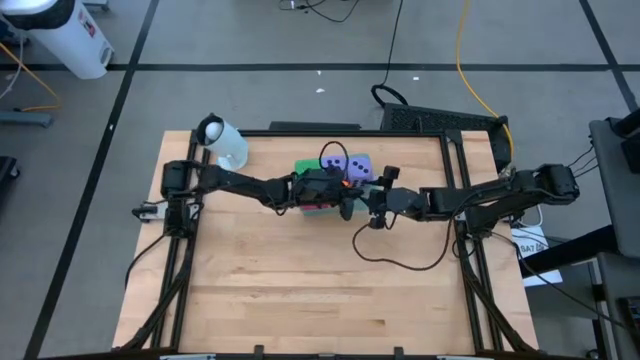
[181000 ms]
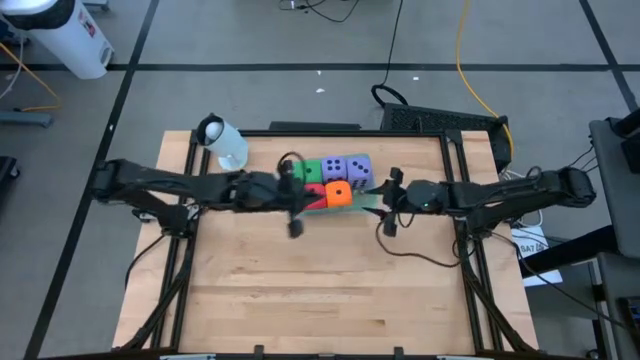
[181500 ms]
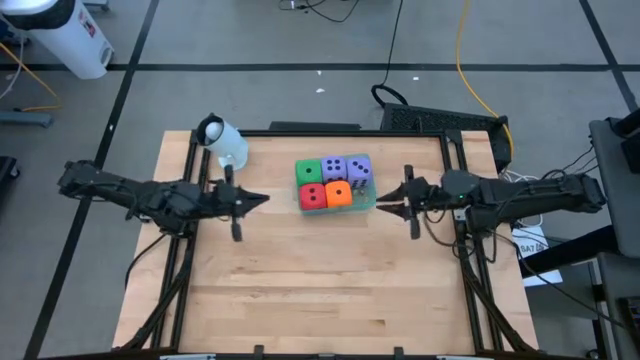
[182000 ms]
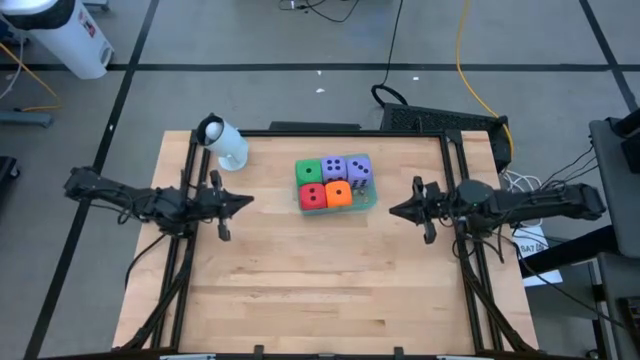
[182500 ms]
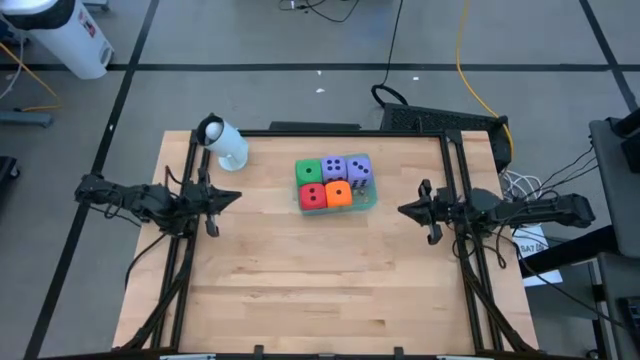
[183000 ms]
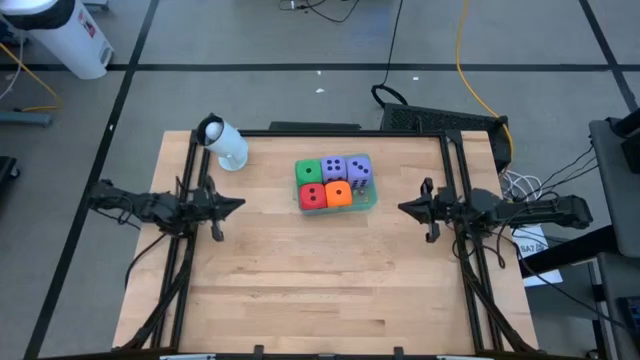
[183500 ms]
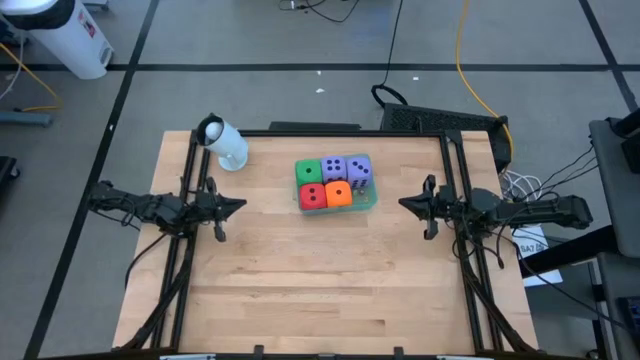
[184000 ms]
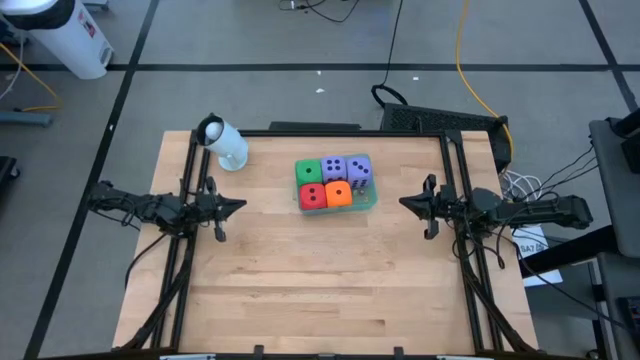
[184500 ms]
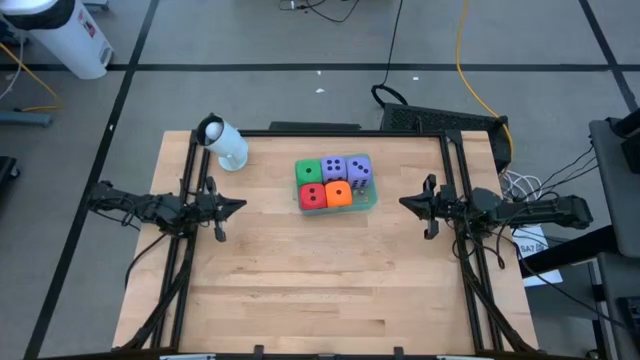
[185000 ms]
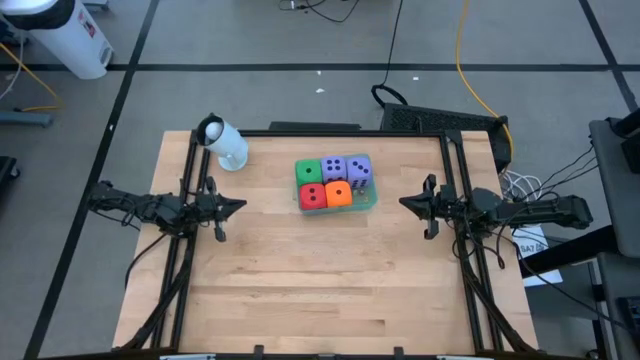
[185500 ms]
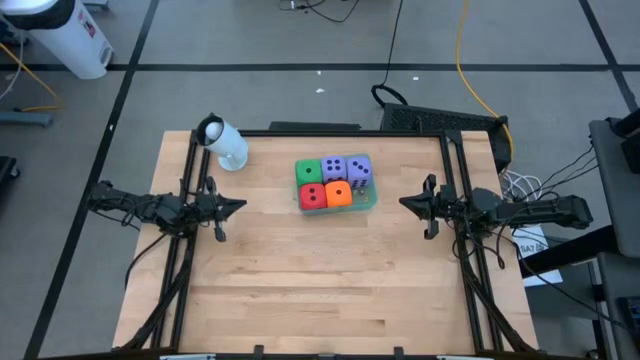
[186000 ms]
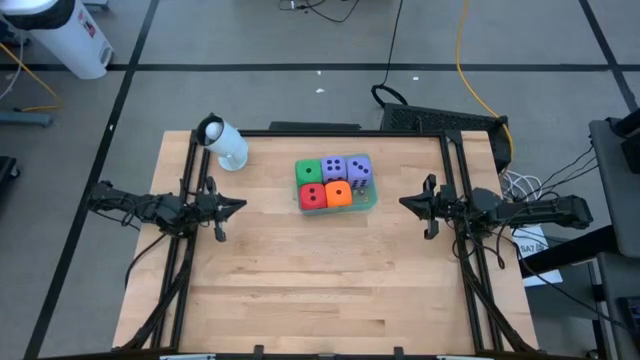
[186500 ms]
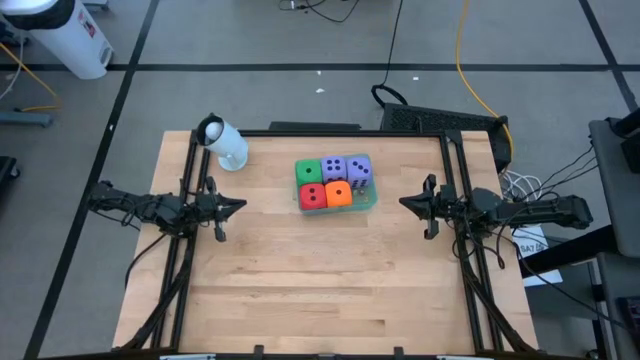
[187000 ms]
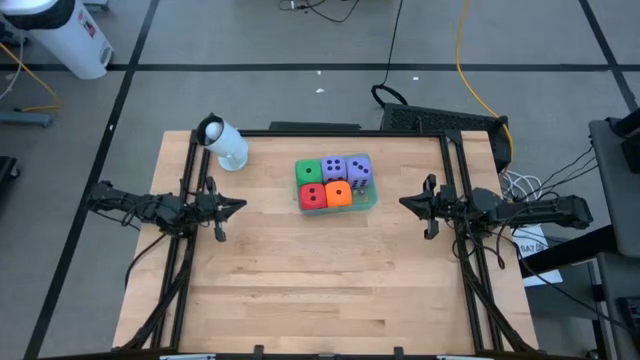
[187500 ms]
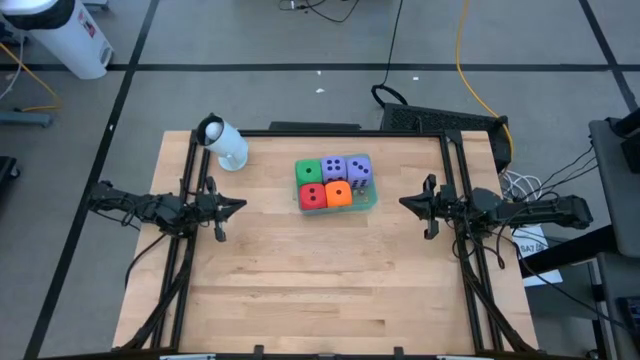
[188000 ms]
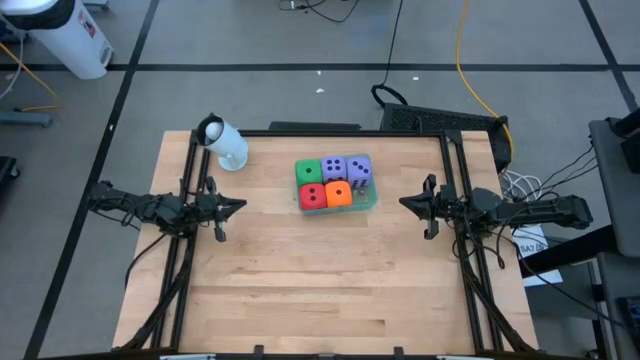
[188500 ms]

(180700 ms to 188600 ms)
Task: Pick & Place Dice
Return to Home Position

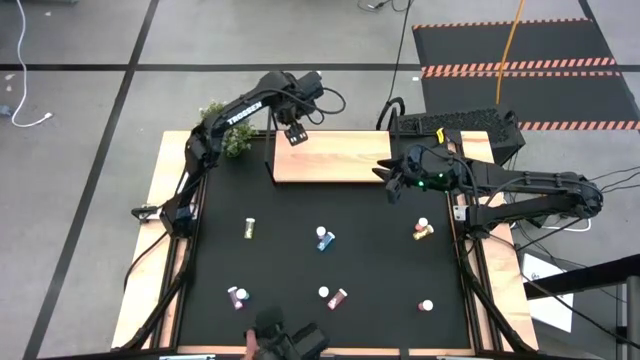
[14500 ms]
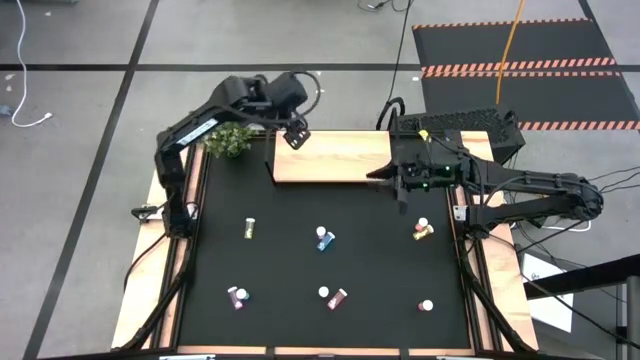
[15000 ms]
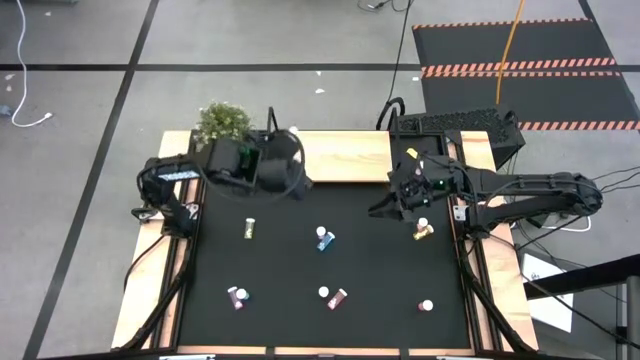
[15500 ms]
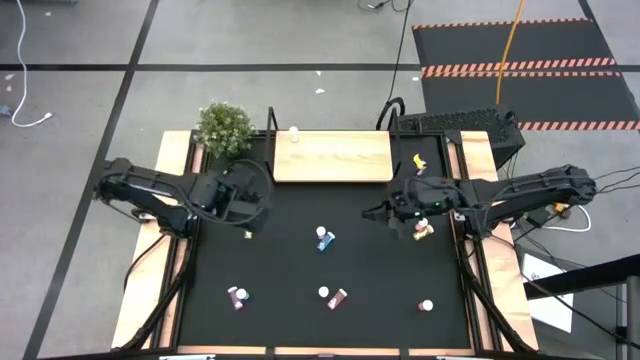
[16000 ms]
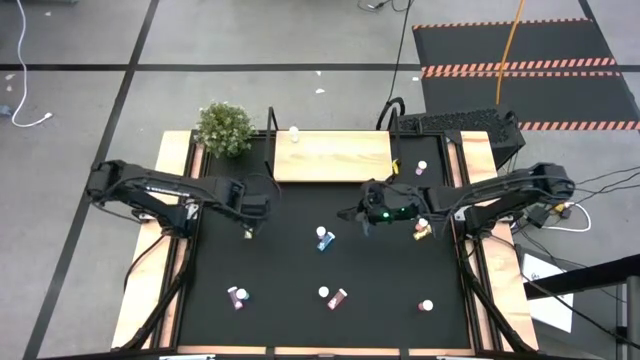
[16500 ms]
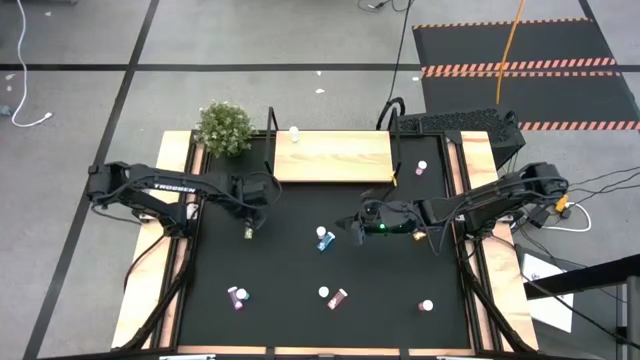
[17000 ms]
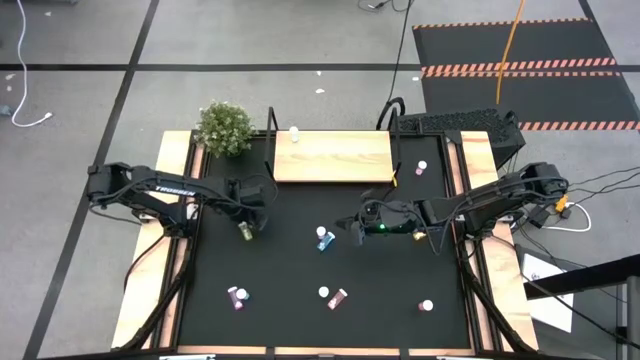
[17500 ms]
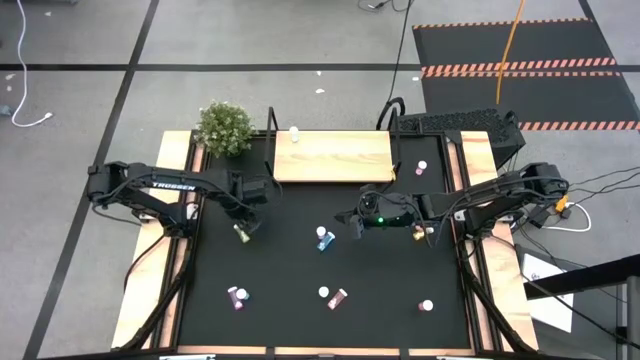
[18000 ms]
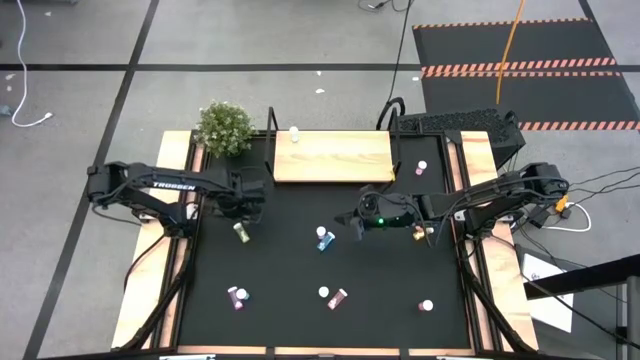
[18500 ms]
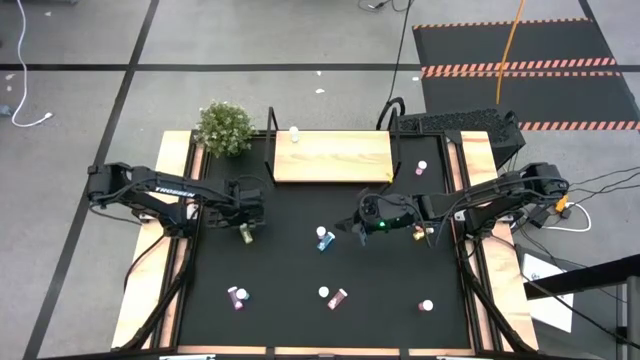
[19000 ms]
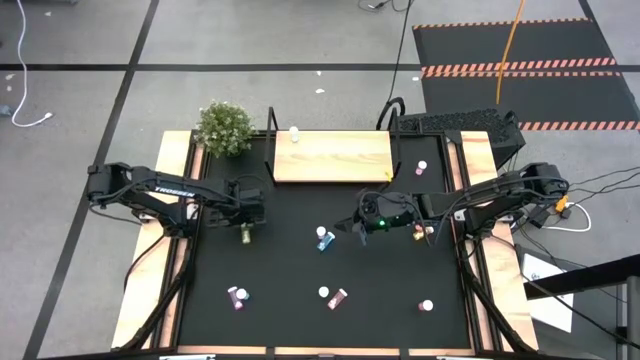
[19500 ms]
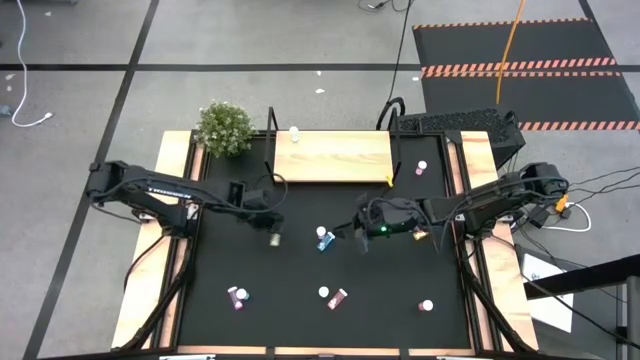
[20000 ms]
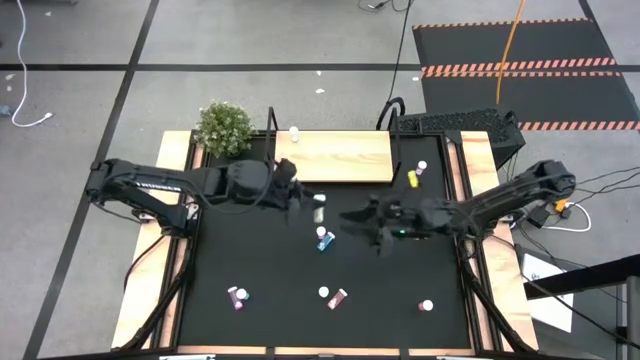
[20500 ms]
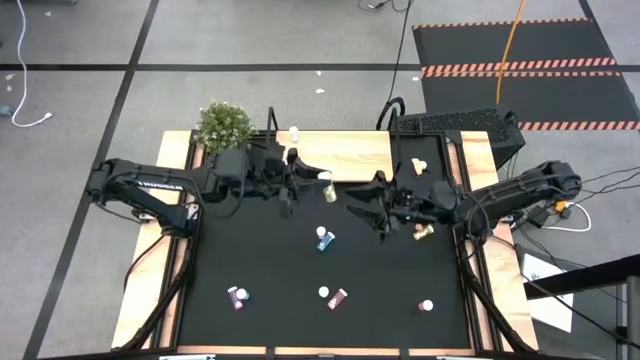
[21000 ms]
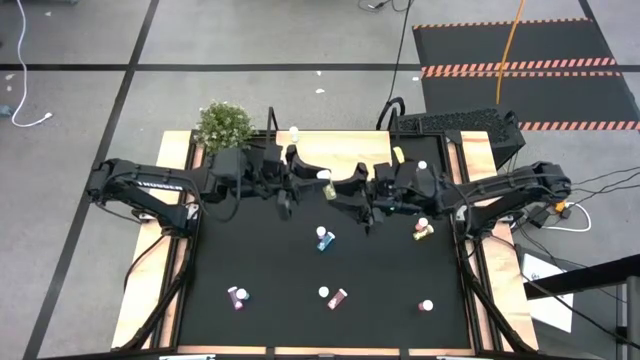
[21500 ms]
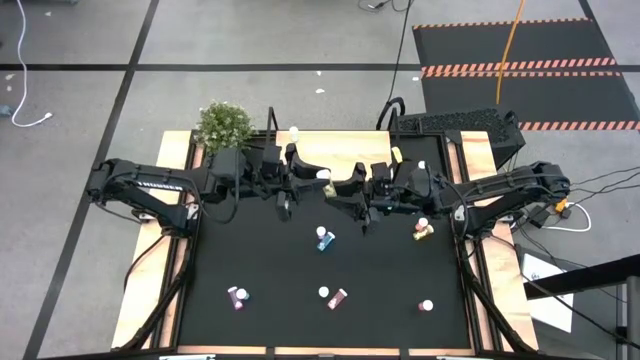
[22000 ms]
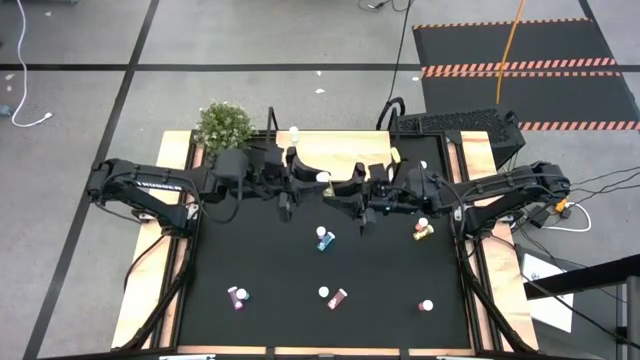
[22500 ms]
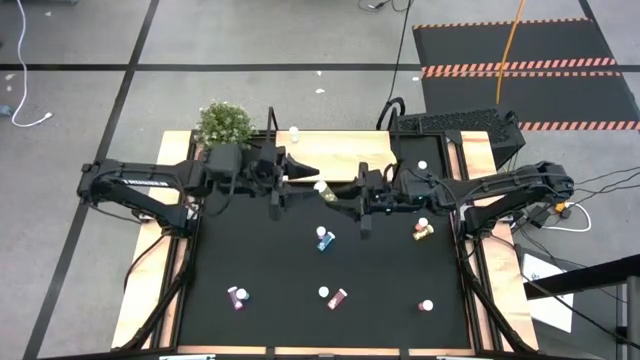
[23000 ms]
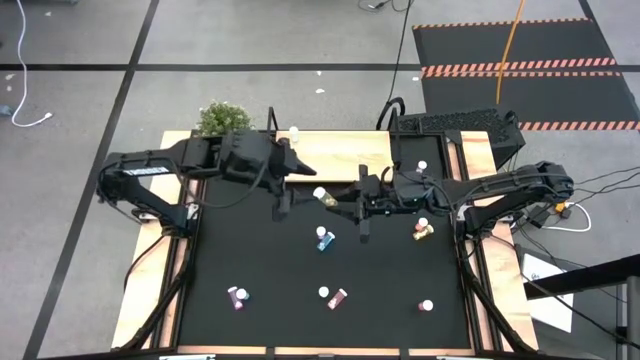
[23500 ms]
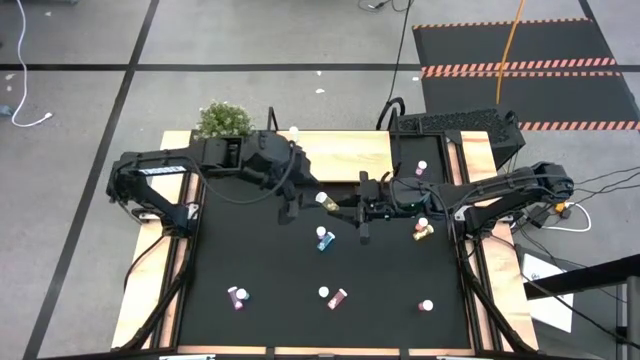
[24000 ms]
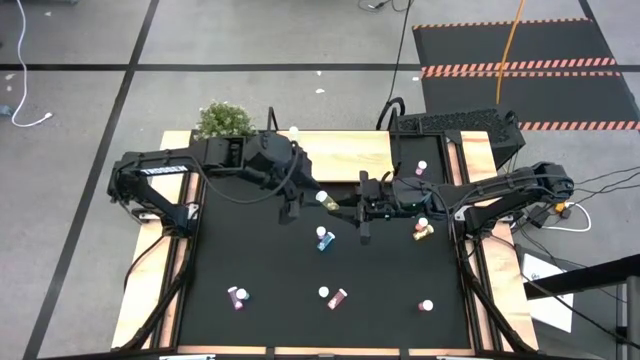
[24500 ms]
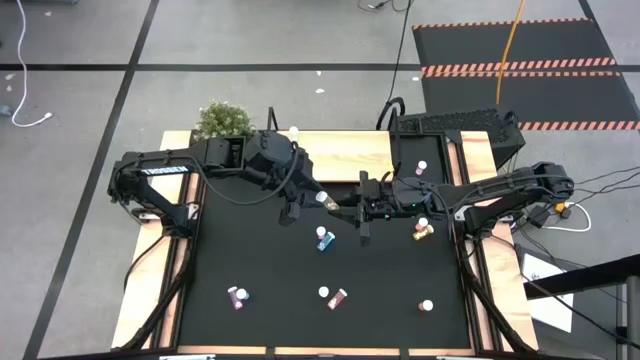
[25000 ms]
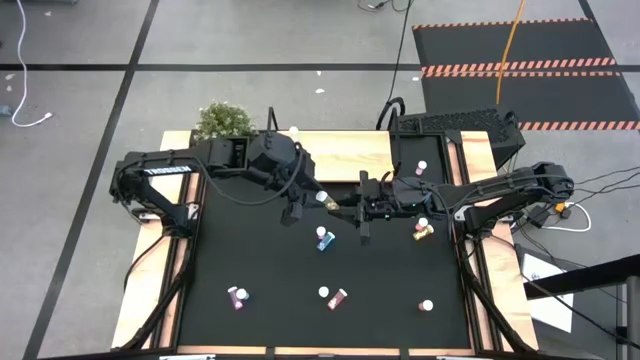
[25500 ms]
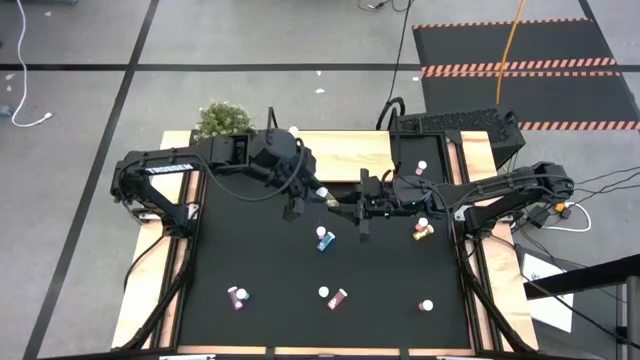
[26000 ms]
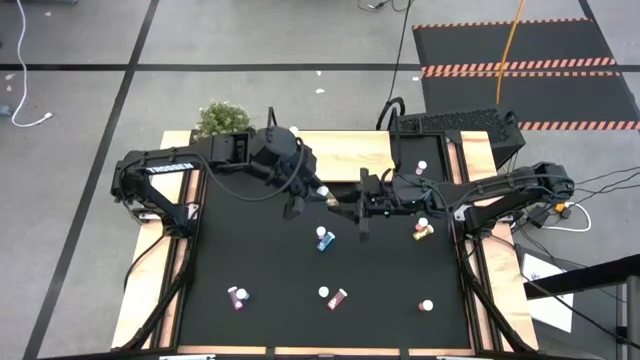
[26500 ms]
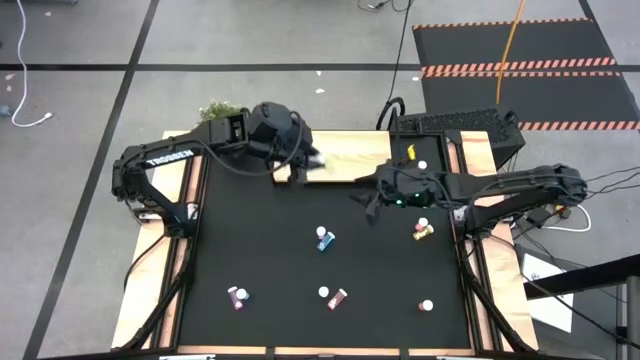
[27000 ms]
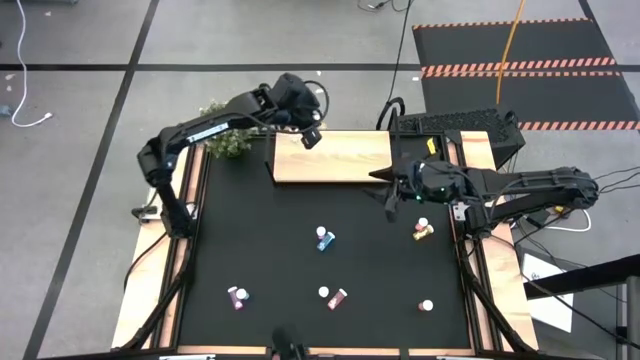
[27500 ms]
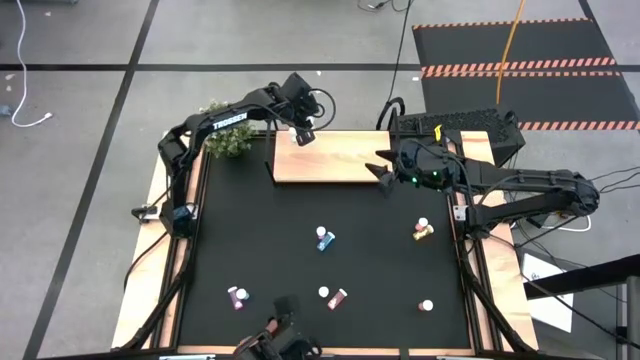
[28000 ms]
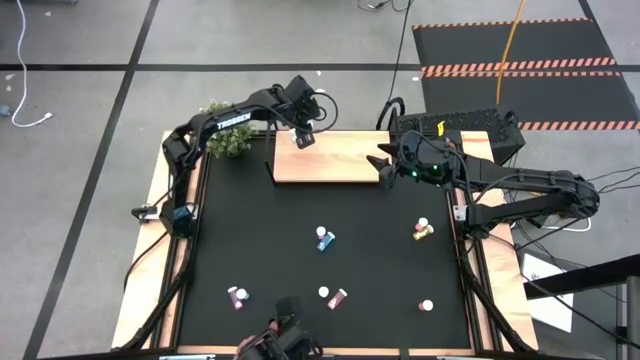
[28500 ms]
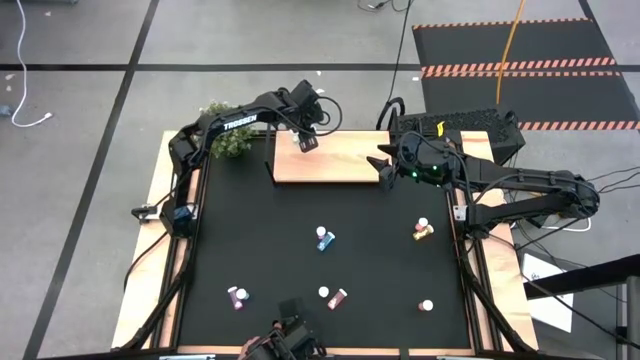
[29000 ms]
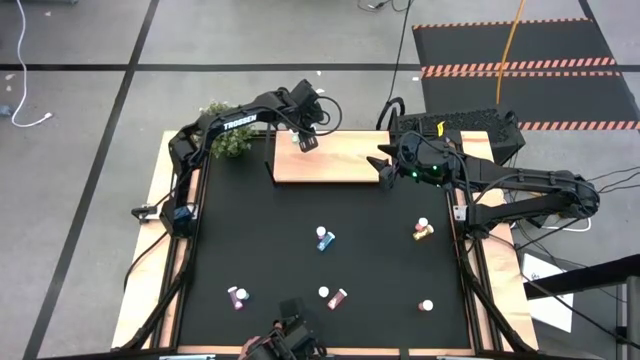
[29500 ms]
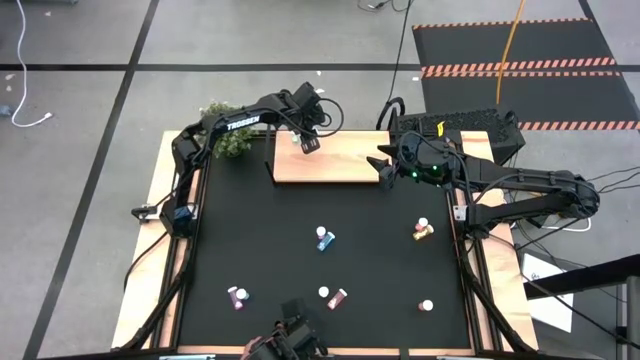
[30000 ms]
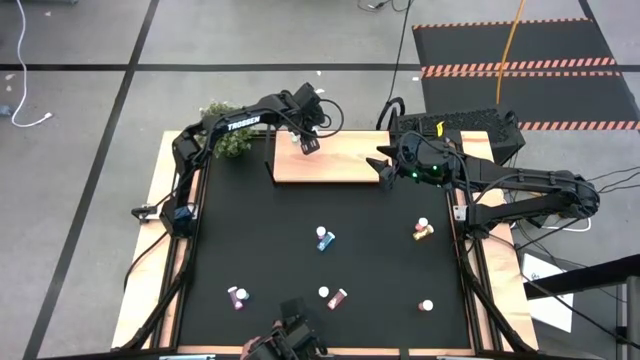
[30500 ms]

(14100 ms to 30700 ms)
Task: Pick and place medicine bottles onto shelf by color
Put the top left yellow pill bottle on the shelf
